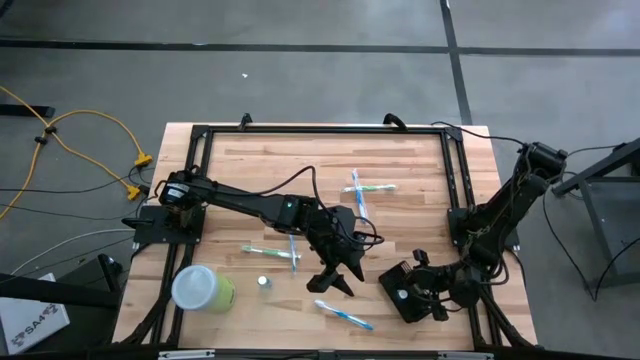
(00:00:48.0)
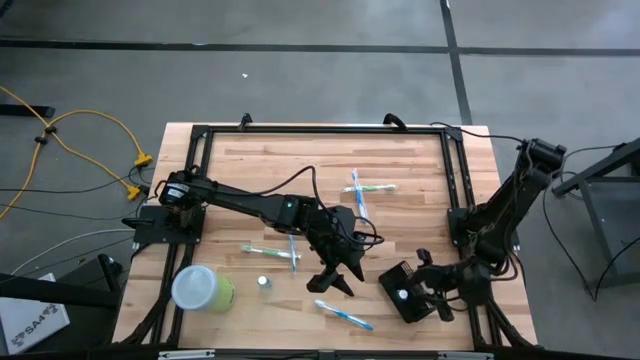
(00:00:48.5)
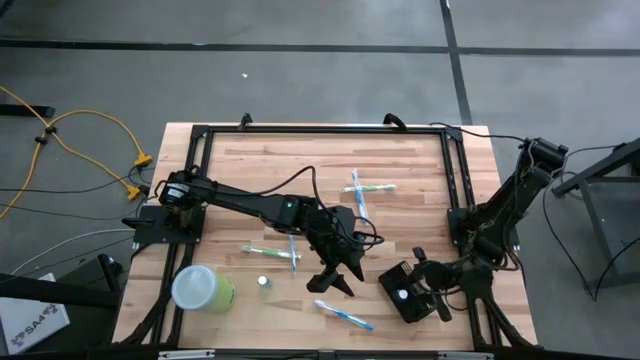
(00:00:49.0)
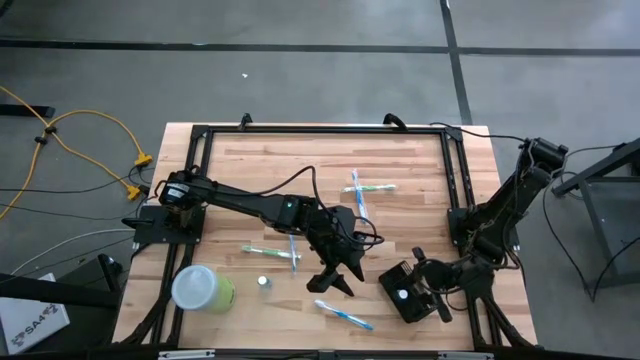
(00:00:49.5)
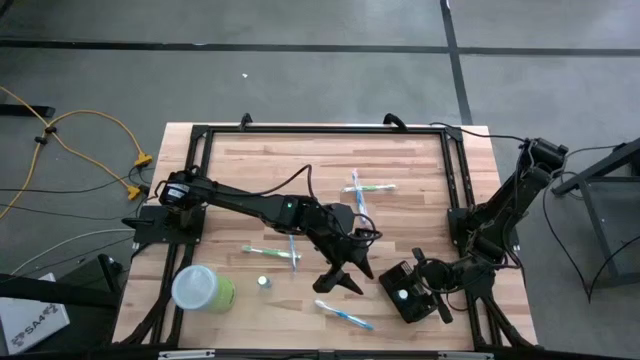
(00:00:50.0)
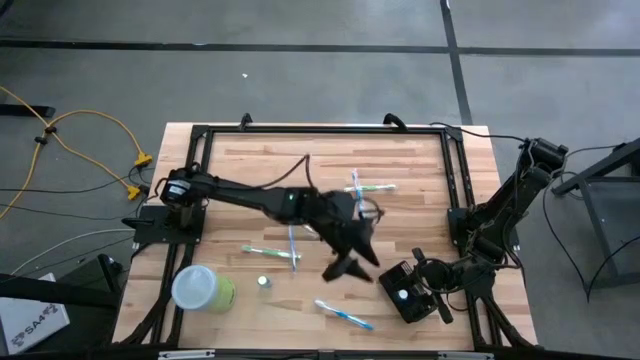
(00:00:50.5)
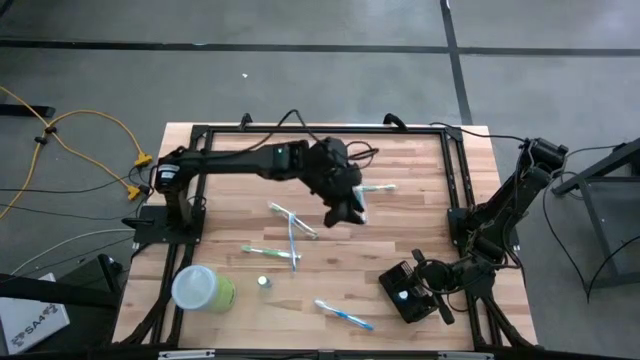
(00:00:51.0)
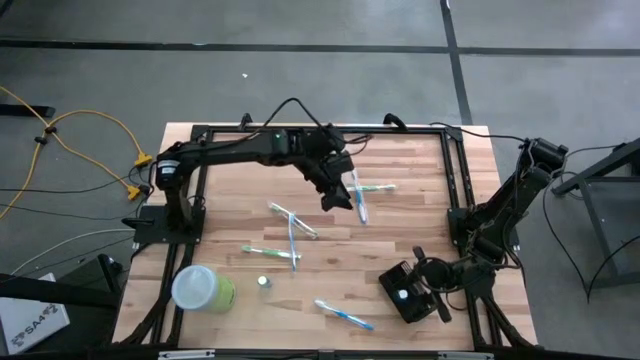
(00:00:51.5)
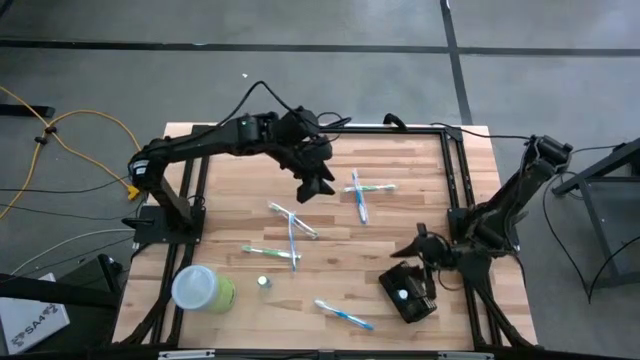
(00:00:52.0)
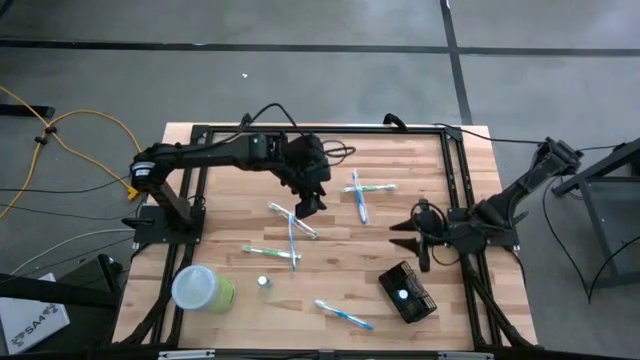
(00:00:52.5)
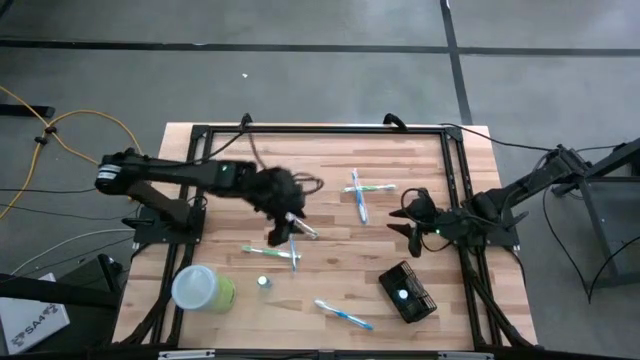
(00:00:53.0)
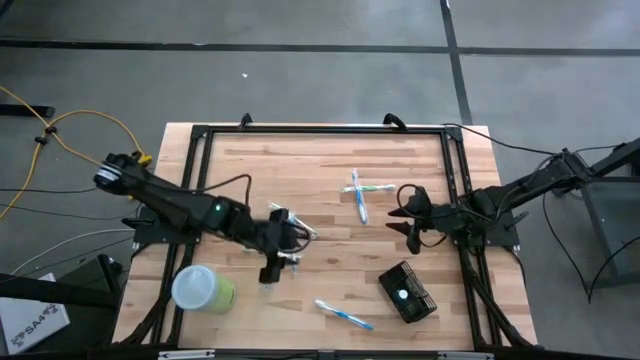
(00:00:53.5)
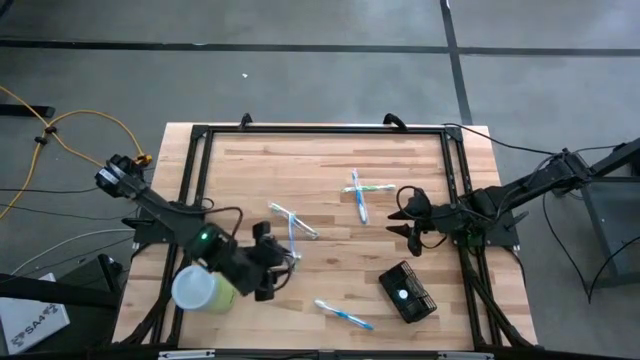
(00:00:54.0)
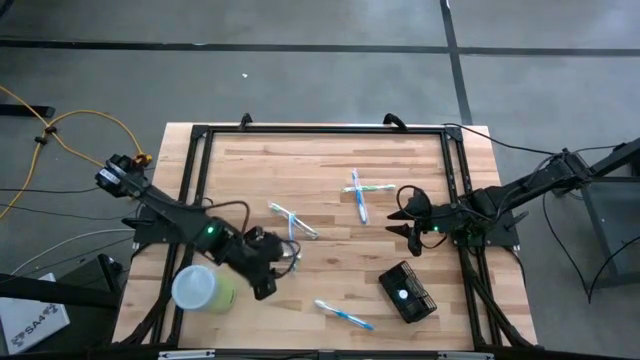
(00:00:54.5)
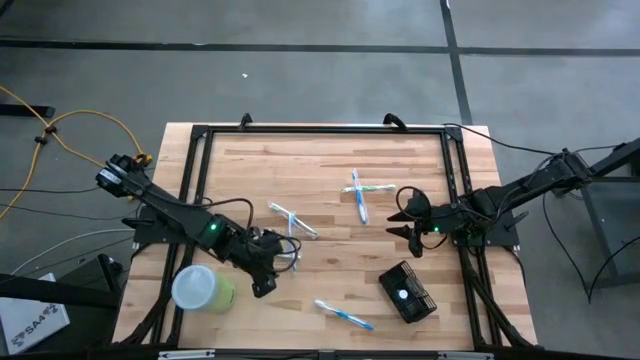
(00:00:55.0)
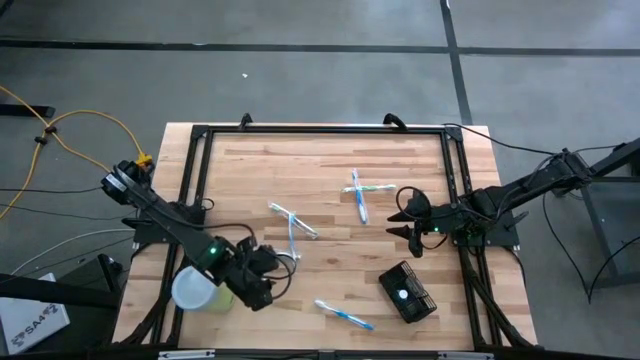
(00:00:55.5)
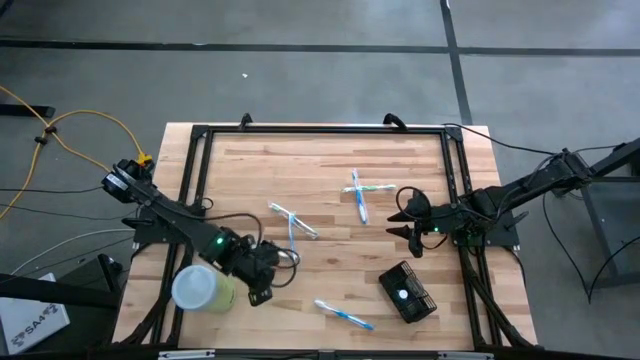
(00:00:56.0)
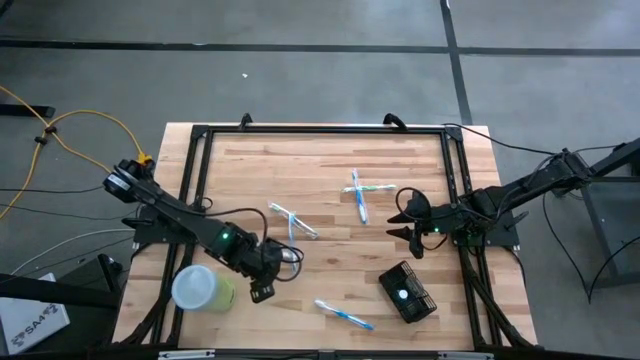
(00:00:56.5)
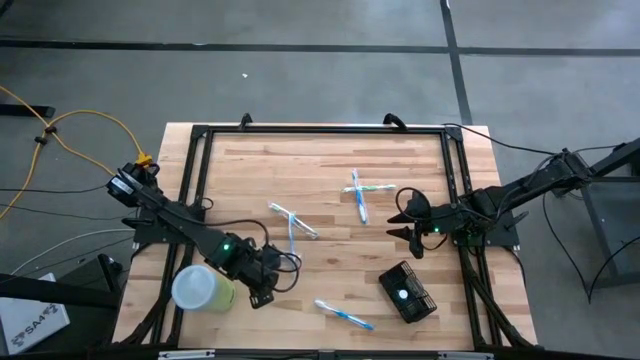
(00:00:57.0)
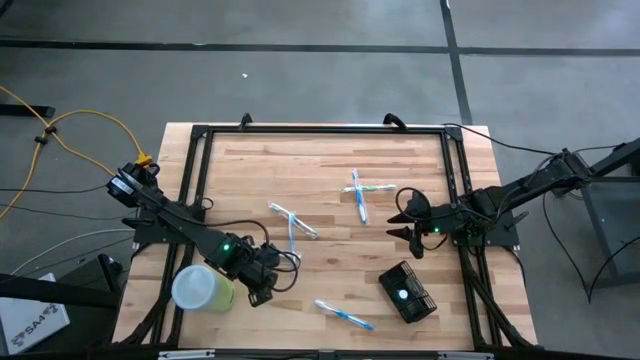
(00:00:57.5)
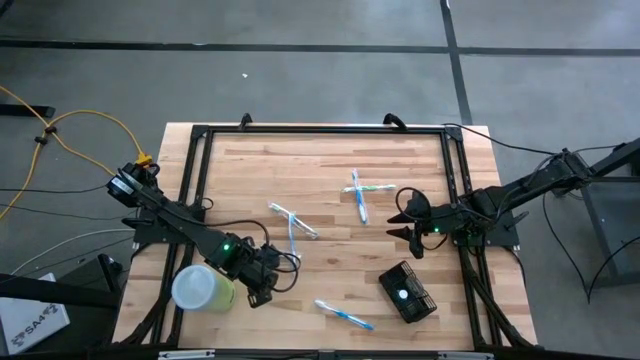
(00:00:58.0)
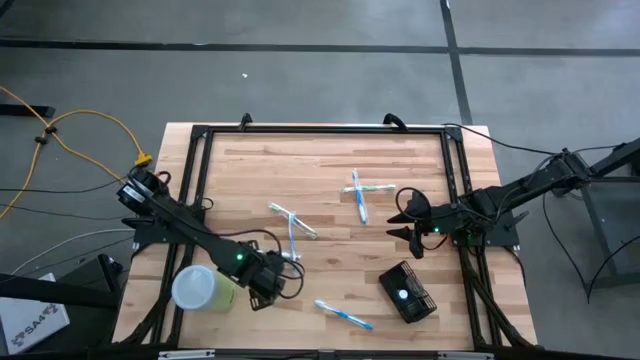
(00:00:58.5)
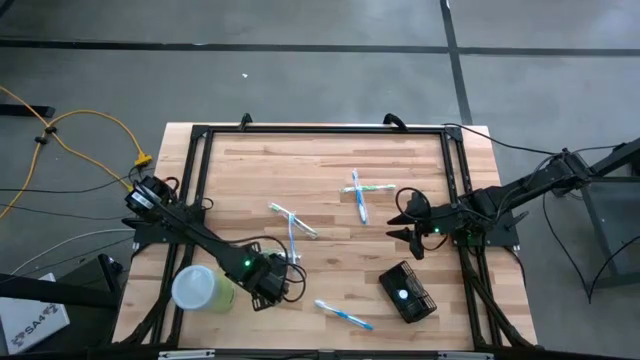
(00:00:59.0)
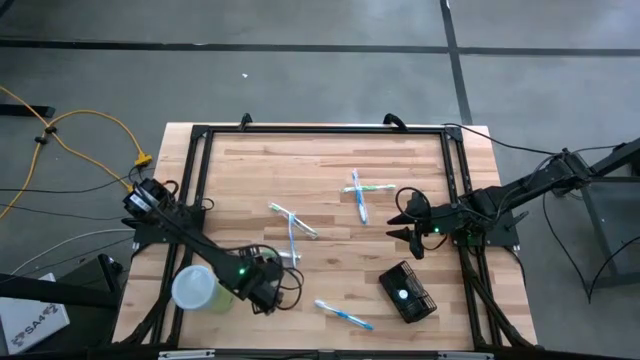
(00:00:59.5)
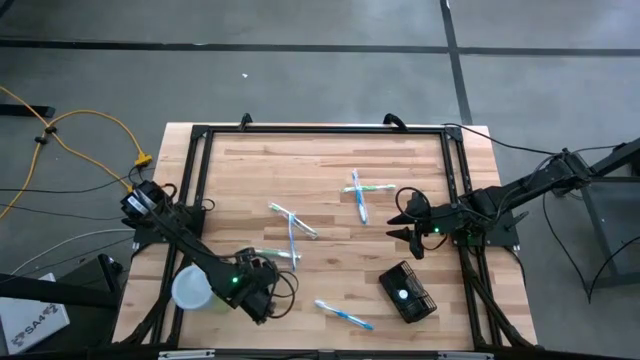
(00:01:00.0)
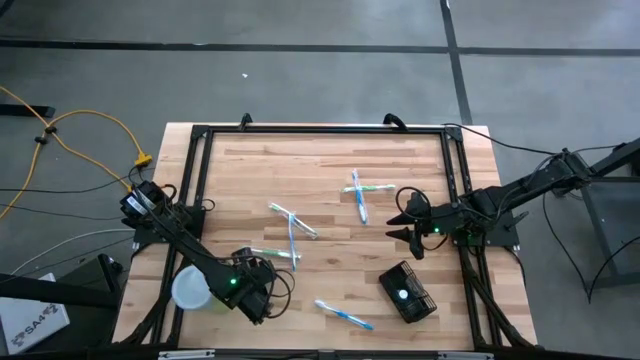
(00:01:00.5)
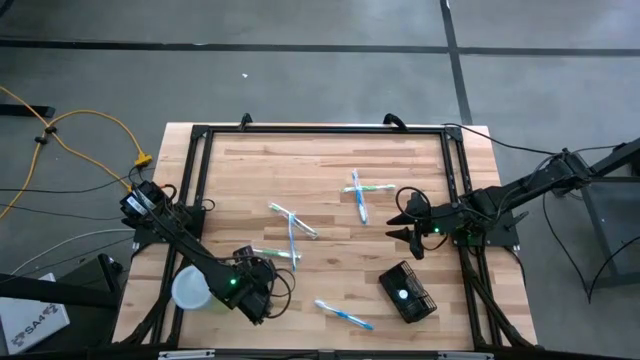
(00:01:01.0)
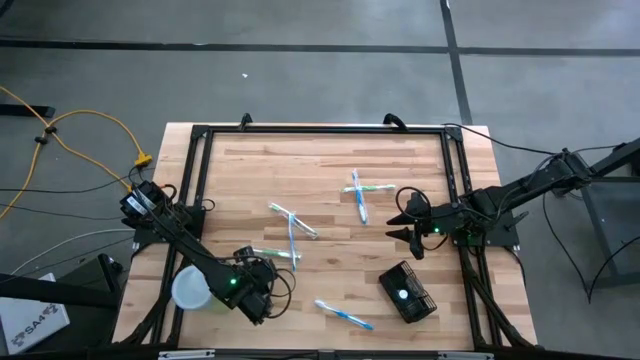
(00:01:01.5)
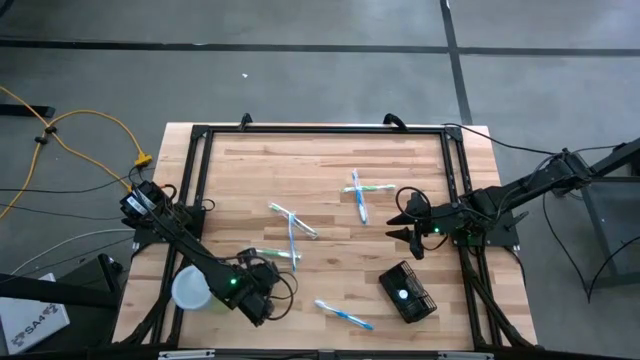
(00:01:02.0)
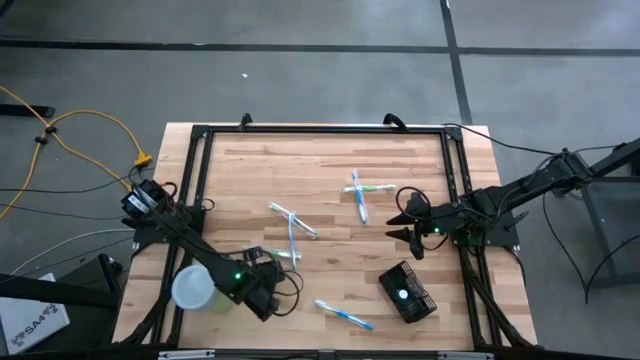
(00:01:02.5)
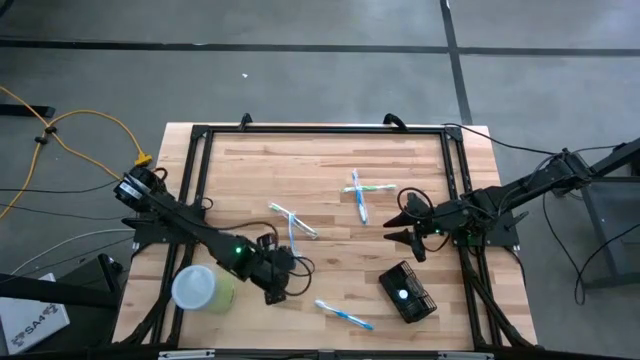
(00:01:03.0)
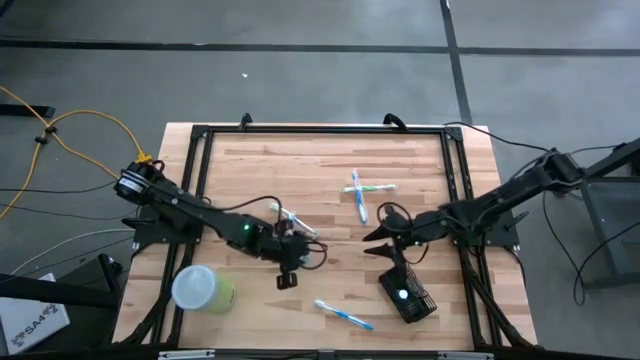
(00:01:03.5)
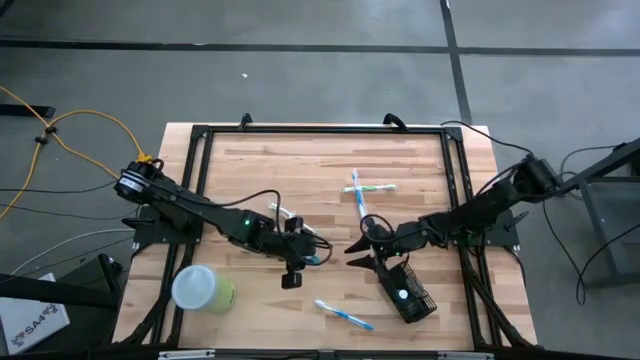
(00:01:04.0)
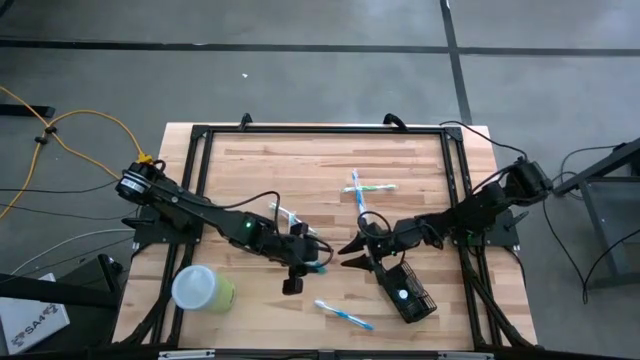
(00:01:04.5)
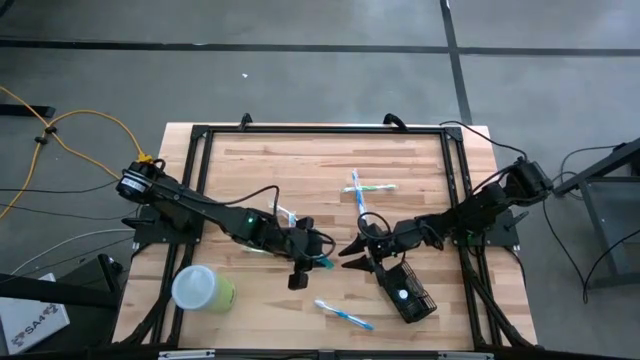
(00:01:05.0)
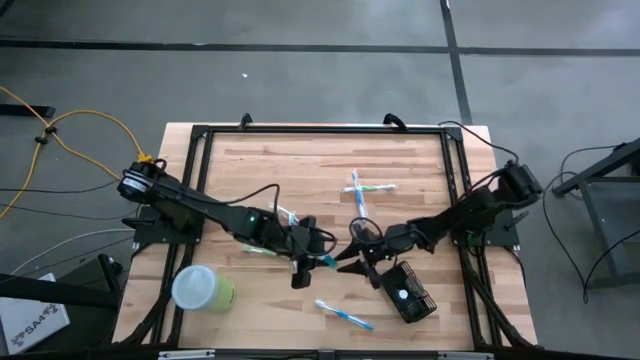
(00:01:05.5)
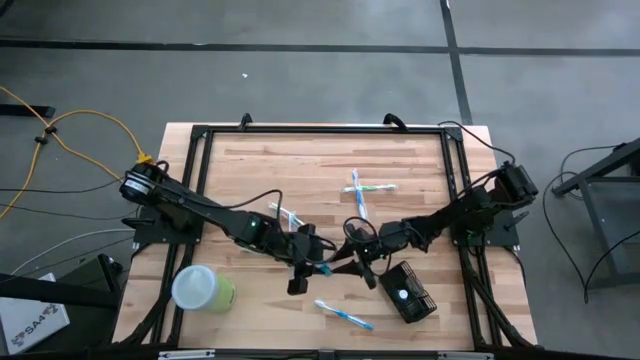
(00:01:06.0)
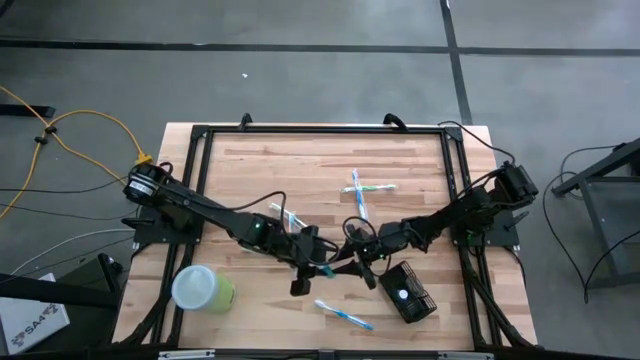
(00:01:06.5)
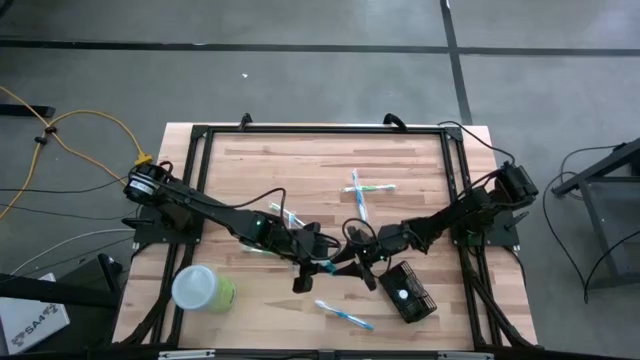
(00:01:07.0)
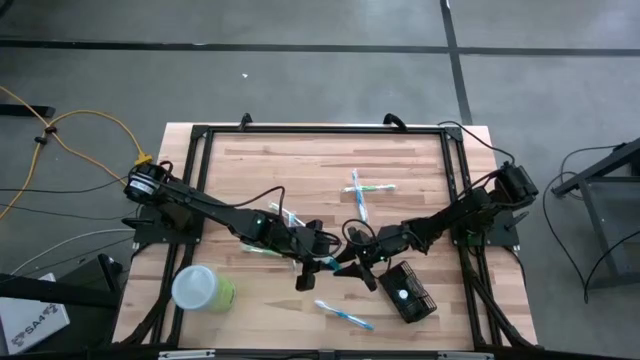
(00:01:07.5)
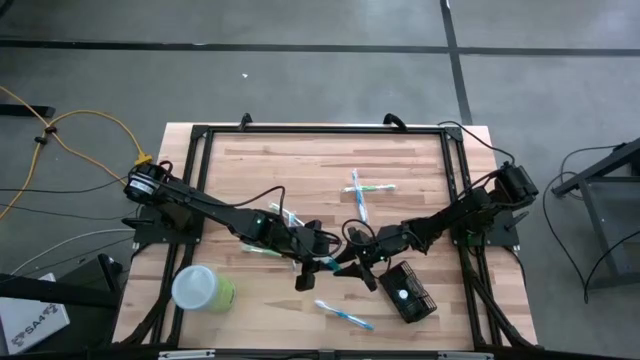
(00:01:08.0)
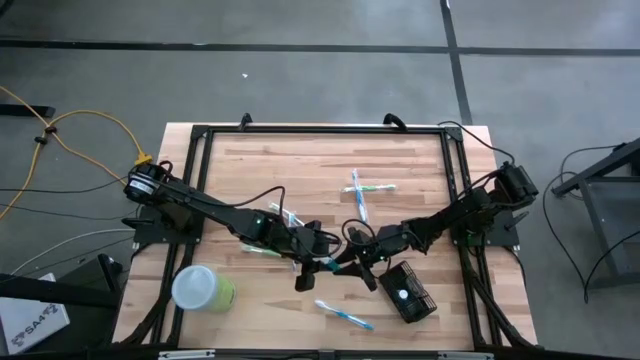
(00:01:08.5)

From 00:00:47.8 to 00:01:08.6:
Task: Pick & Place toothbrushing station
Put the blue mouthwash into the middle section of the black wire organizer
